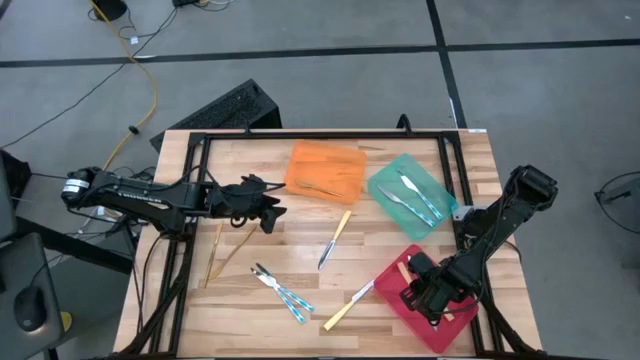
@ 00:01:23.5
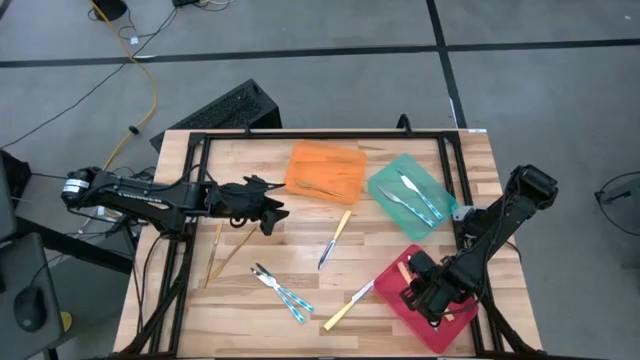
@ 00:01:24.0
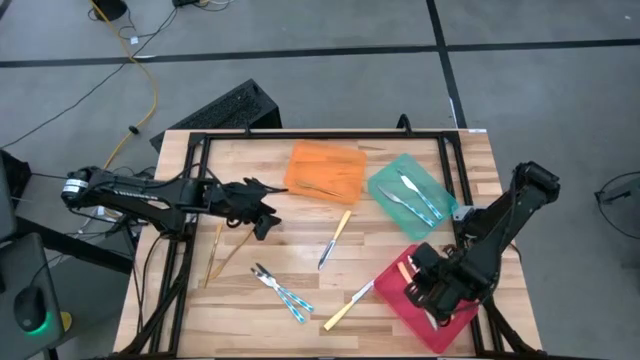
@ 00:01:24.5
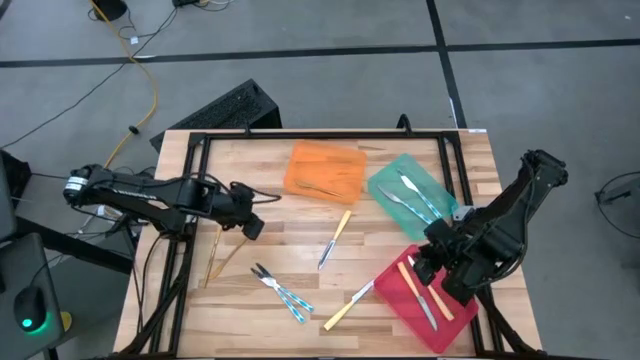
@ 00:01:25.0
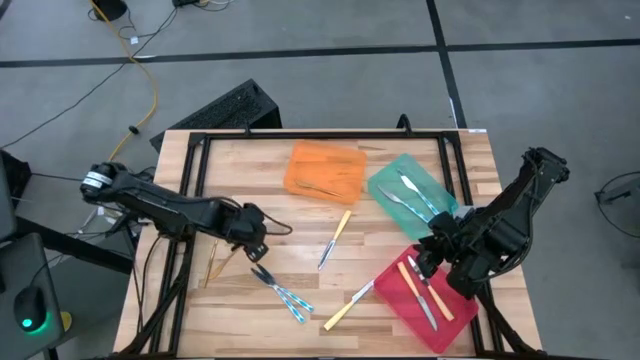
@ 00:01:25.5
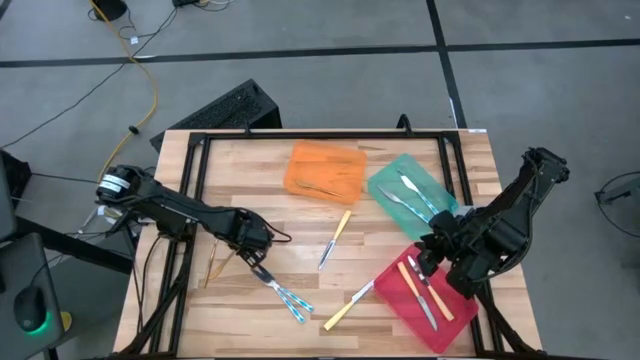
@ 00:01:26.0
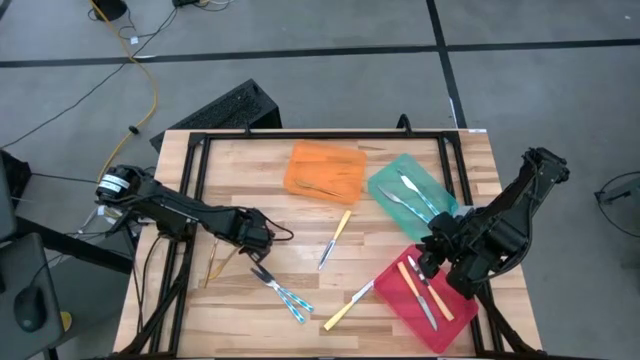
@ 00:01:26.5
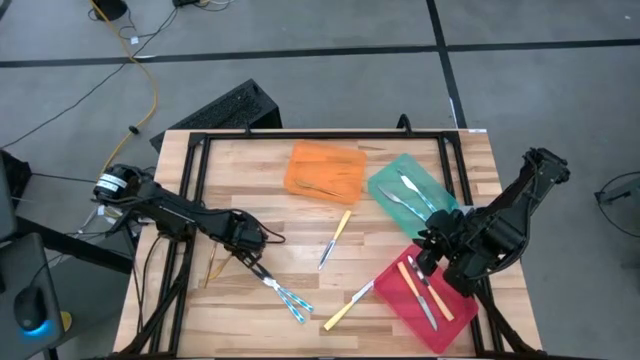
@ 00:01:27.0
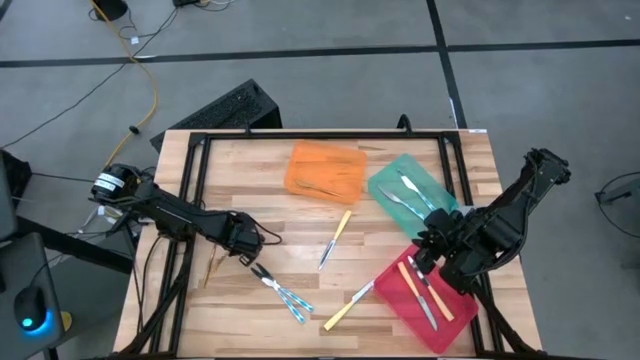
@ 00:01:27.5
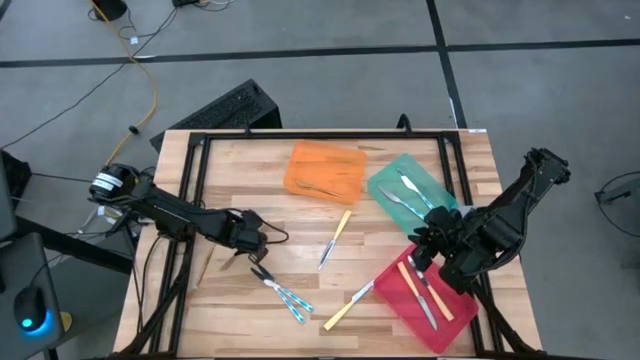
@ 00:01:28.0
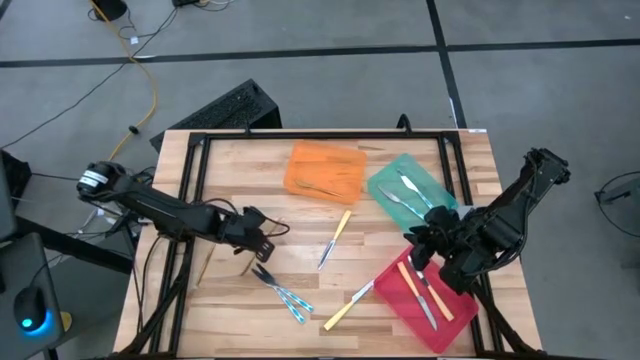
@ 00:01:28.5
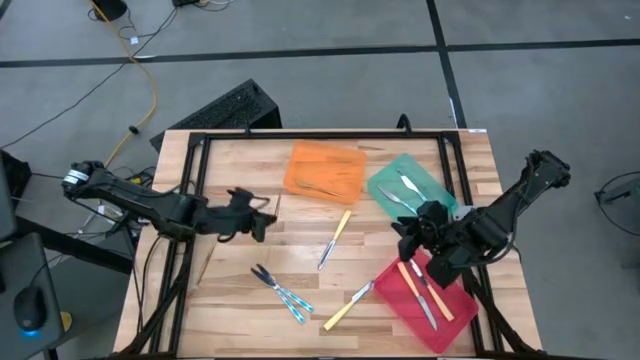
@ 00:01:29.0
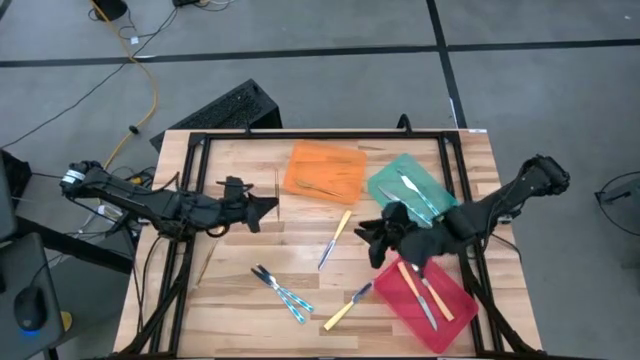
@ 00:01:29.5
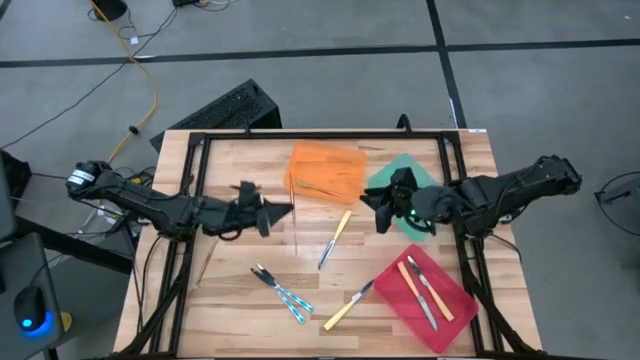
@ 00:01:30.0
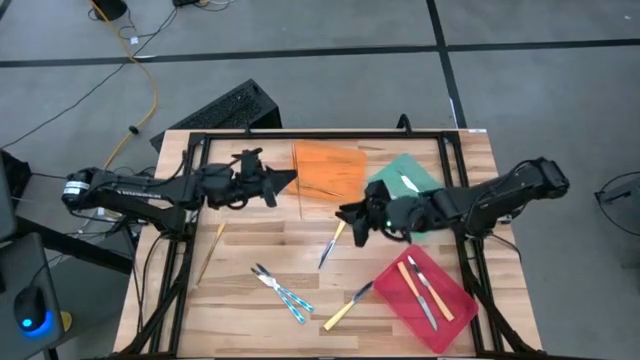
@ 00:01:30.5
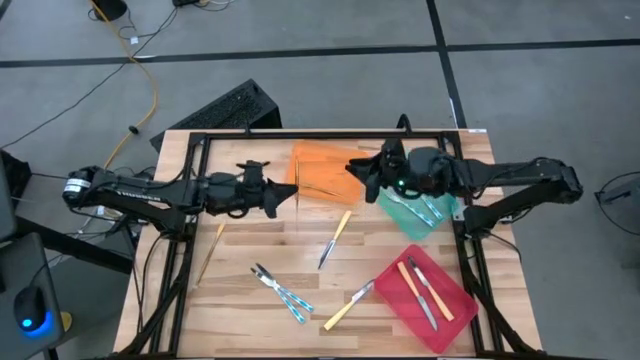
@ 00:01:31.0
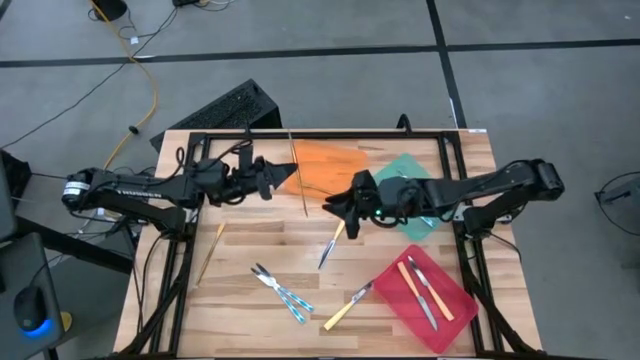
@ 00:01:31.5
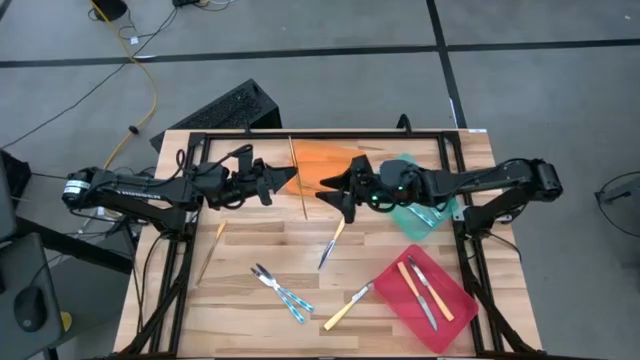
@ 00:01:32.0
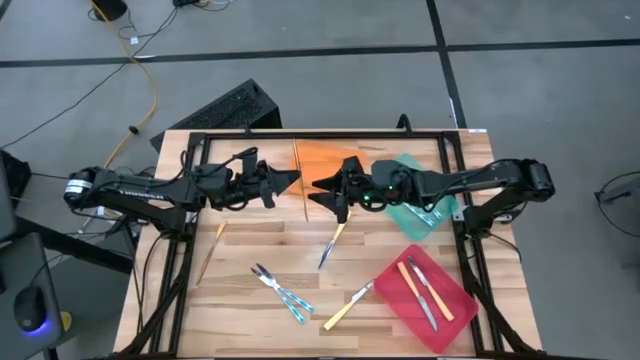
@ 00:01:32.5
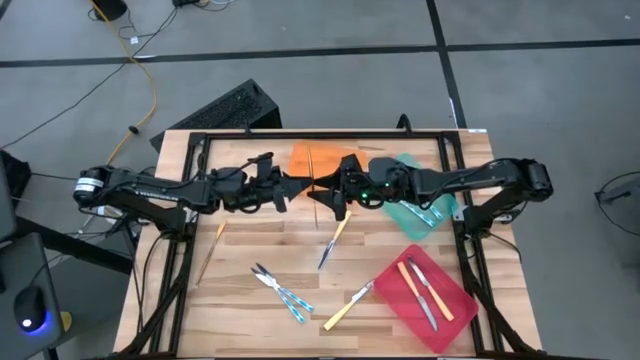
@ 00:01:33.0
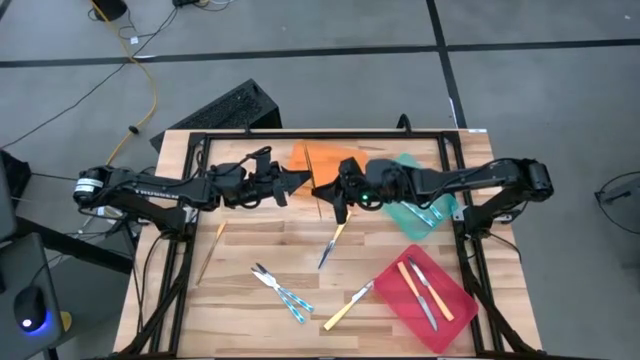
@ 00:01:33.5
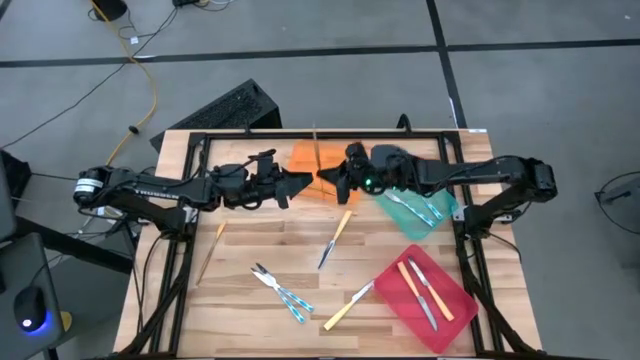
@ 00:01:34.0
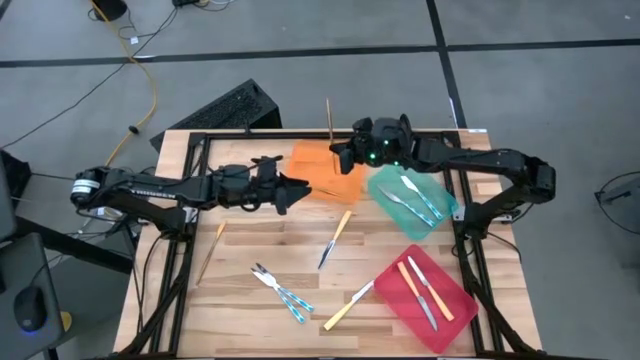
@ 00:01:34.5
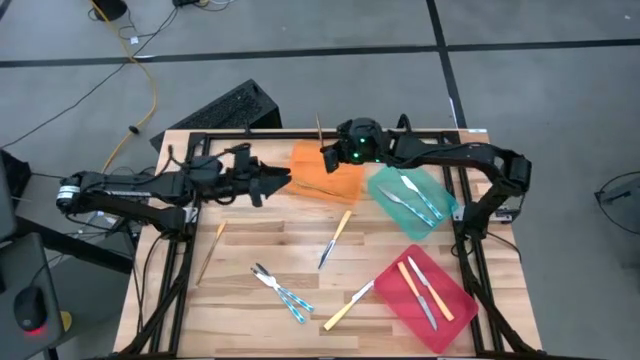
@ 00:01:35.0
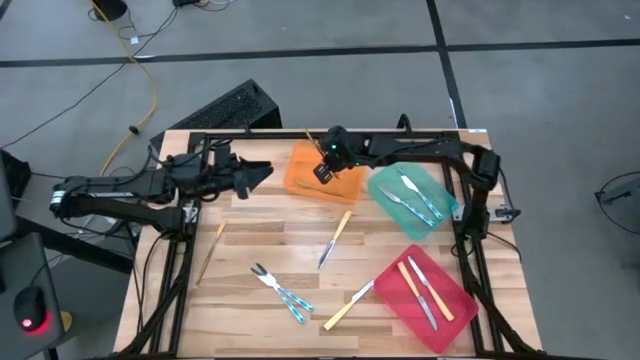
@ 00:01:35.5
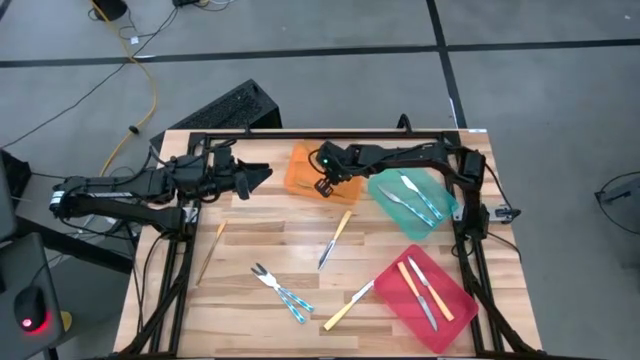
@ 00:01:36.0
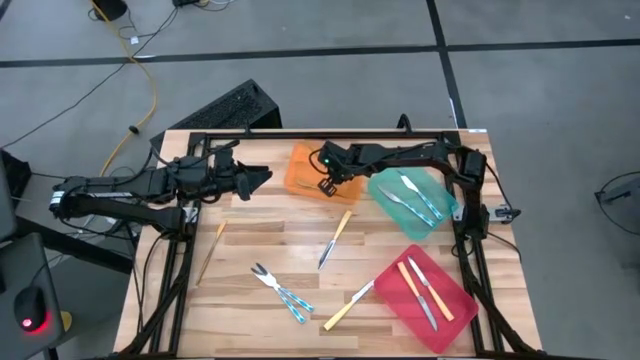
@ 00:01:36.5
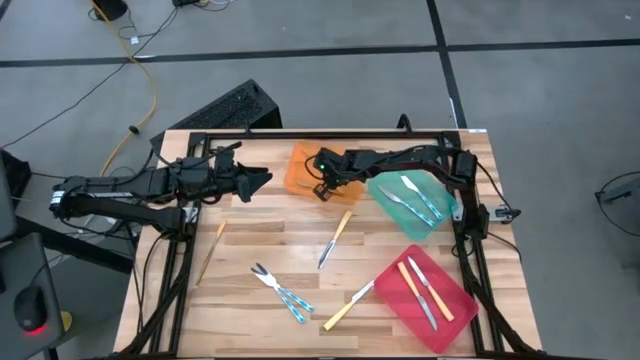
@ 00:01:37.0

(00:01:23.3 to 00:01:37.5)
Task: Sort silverware by color (type)
Put the right gold knife into the orange bin

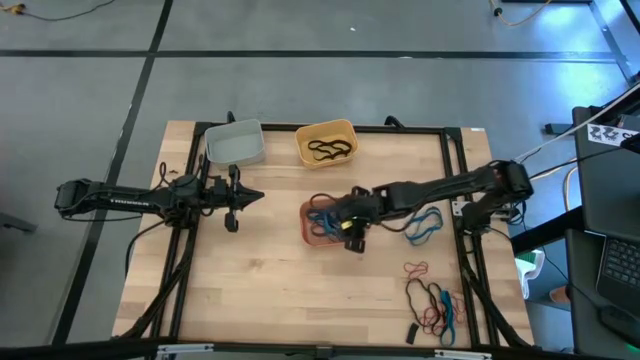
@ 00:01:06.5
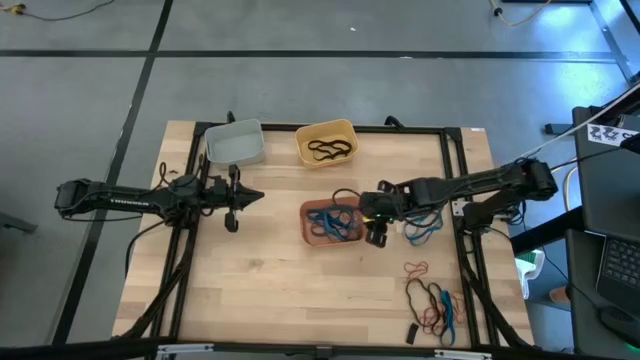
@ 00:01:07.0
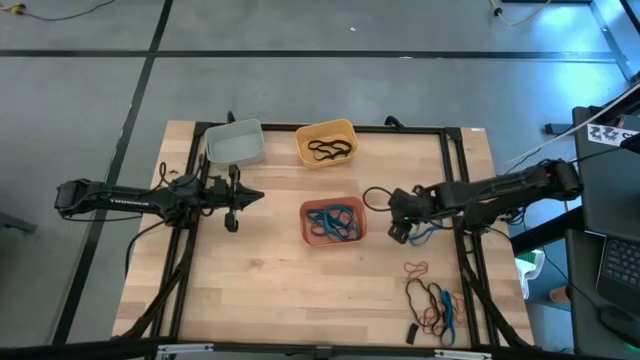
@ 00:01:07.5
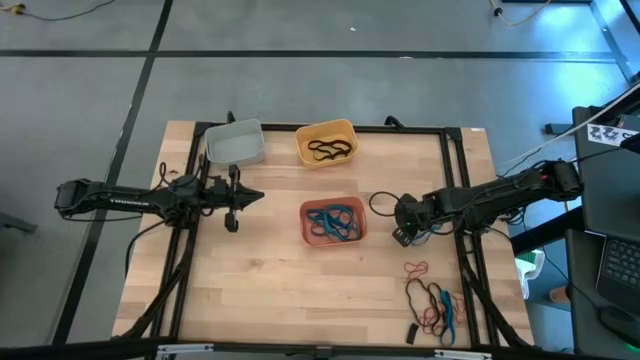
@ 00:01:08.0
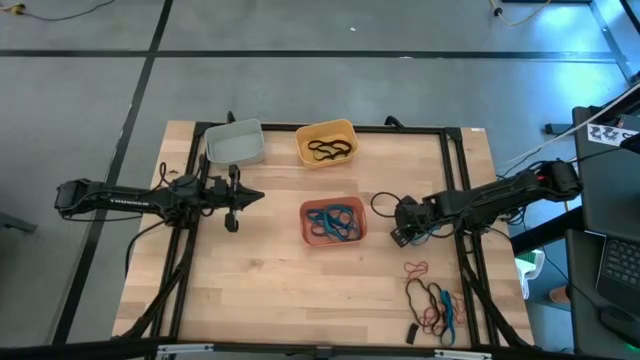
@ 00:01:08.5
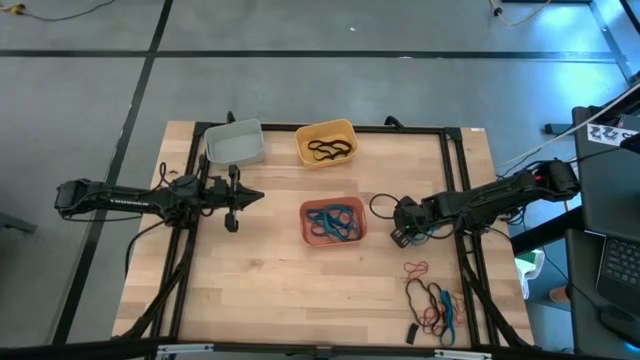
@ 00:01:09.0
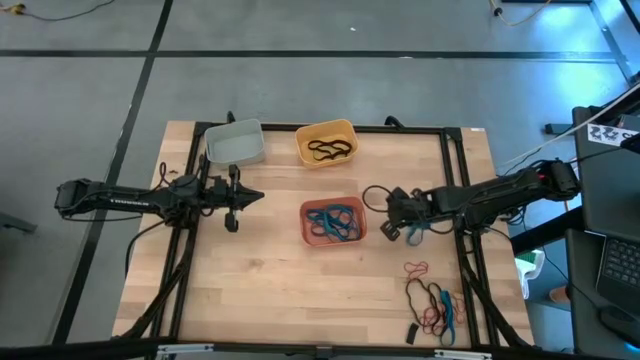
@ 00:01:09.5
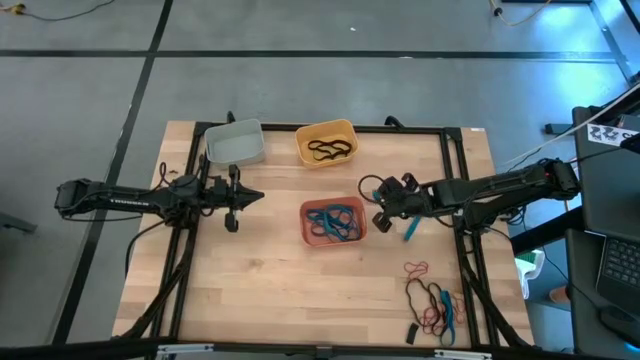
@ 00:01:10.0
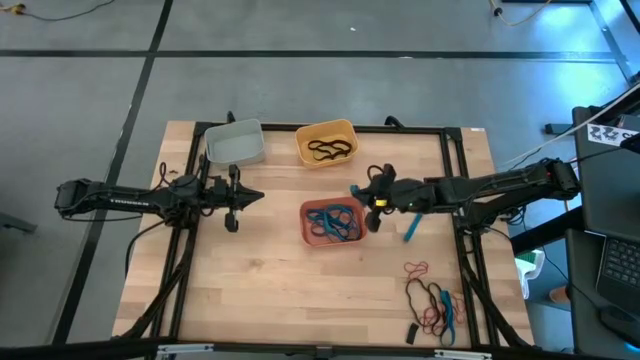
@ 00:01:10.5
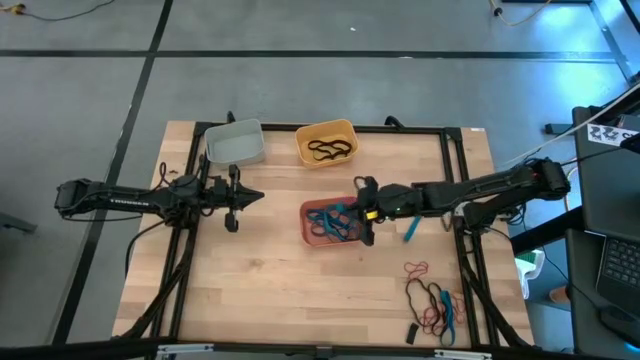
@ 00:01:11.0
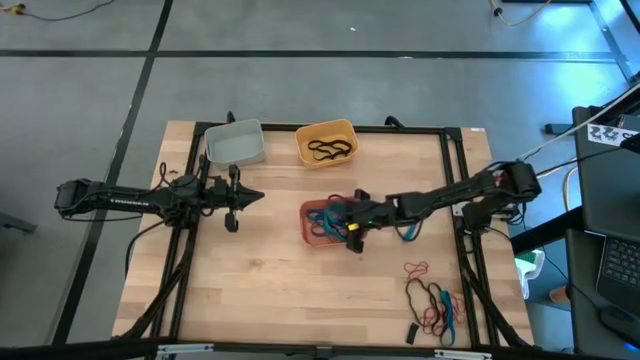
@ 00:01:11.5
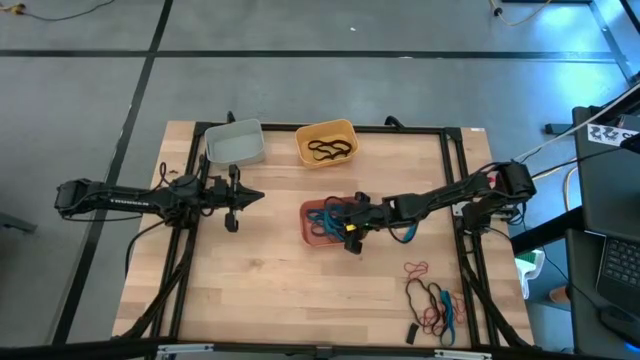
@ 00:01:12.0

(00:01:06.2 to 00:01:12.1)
Task: Sort rubber bands into baskets
Put the blue rubber band into the orange bin
